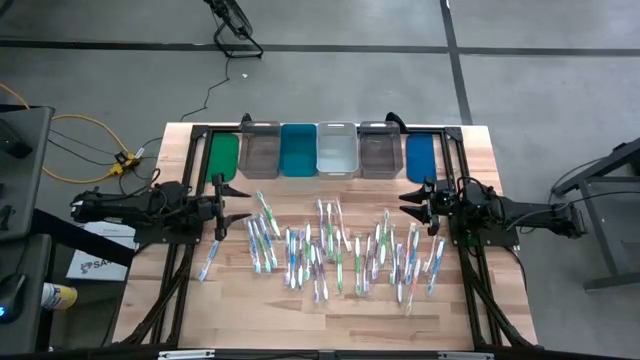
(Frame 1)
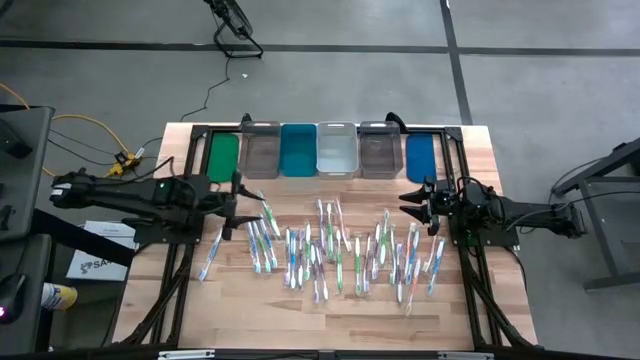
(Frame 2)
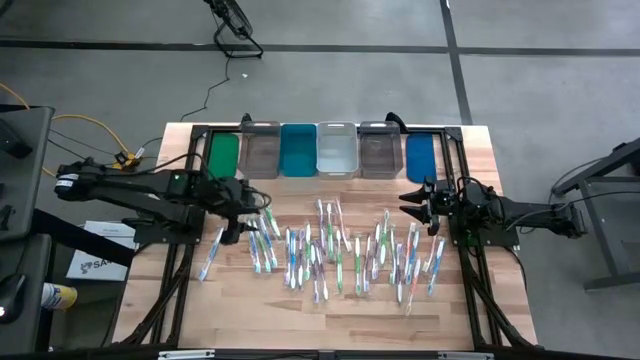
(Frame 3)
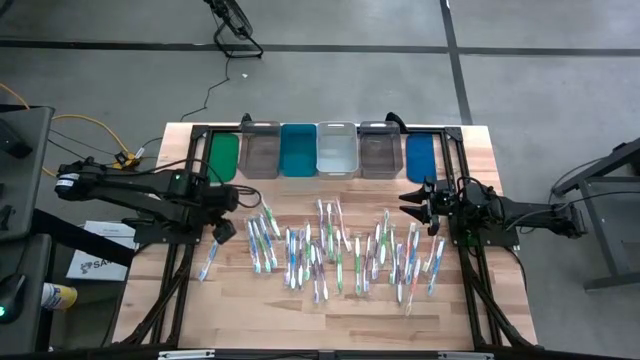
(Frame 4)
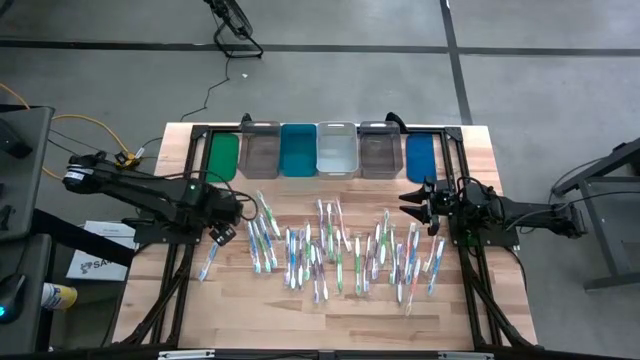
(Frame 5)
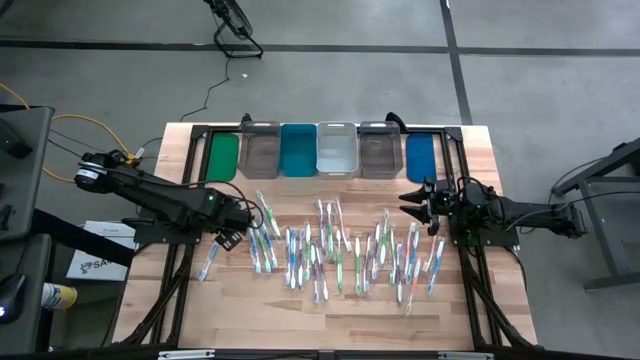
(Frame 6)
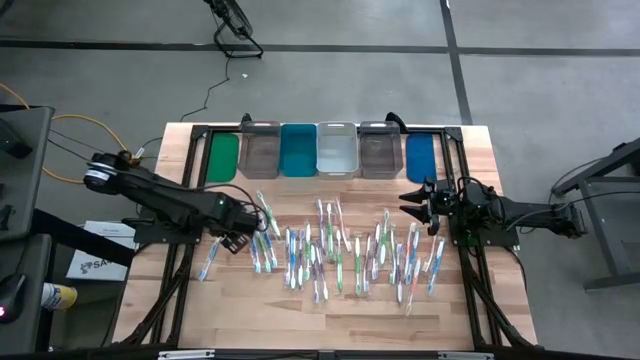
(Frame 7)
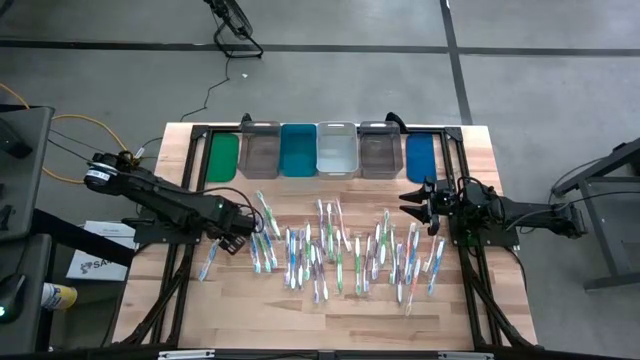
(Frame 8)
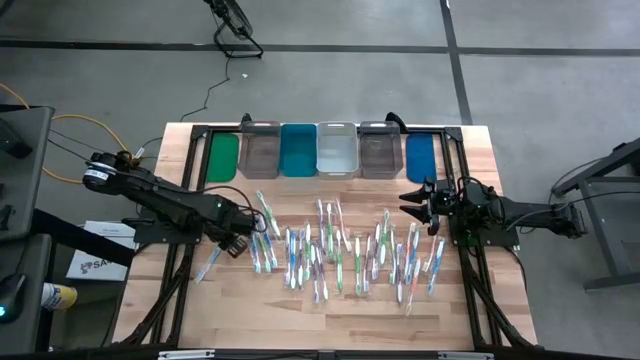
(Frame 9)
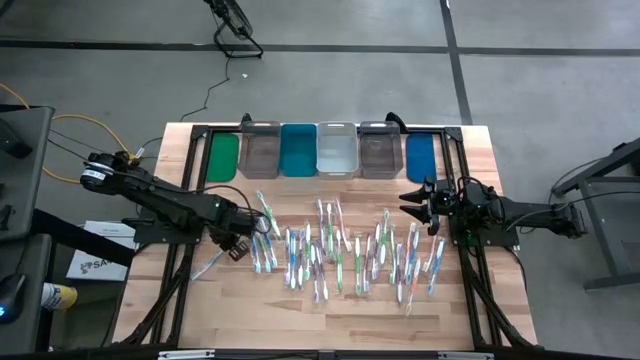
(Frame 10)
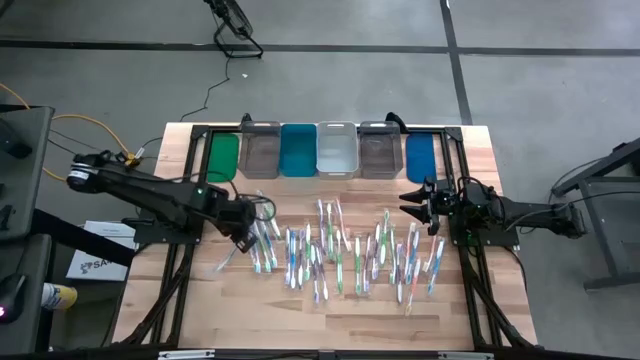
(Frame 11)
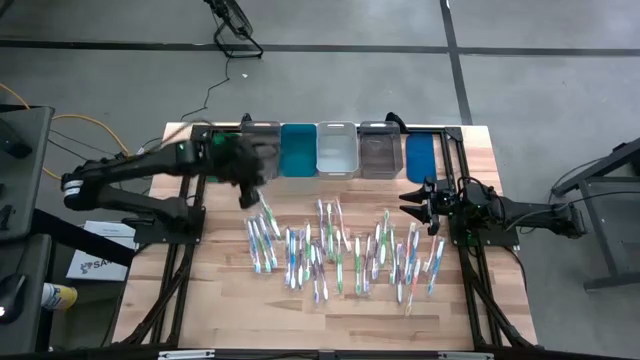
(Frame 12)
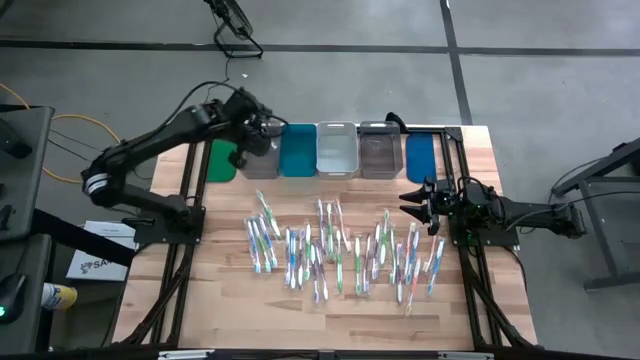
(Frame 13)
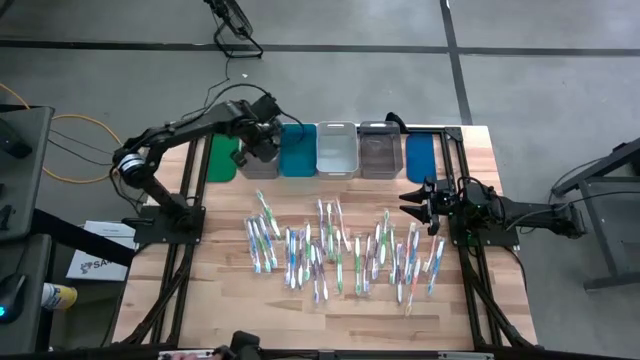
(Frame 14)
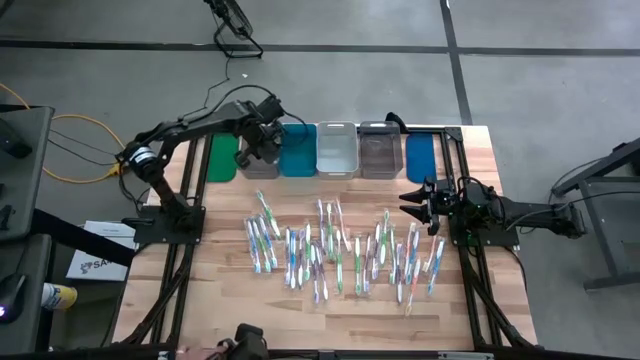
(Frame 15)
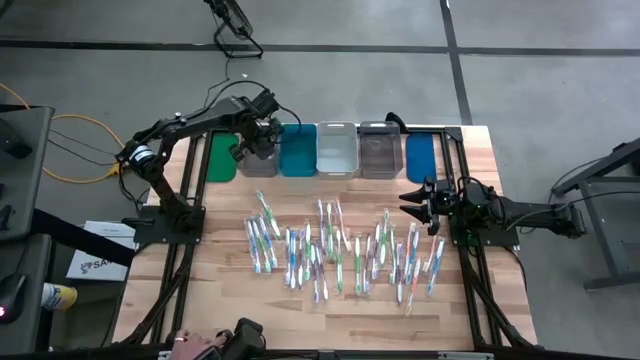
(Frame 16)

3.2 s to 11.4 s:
Task: Pick & Place Toothbrushes
Put the blue toothbrush into the left black bin

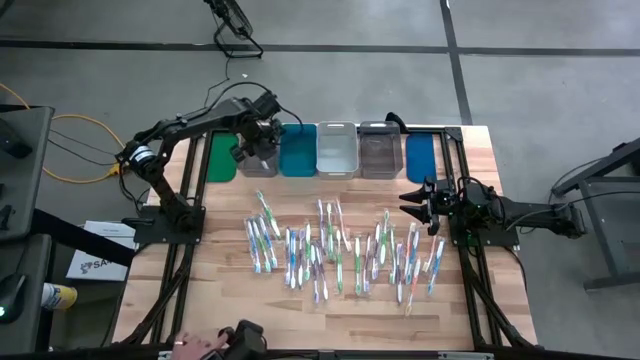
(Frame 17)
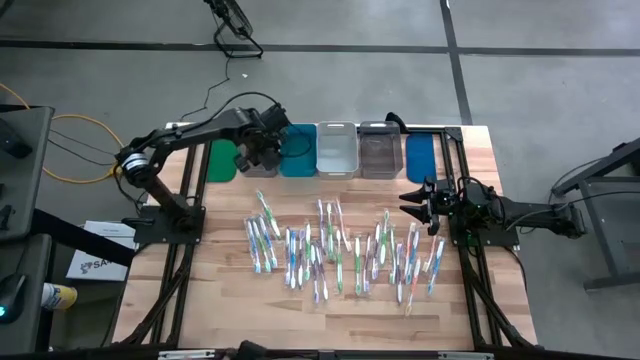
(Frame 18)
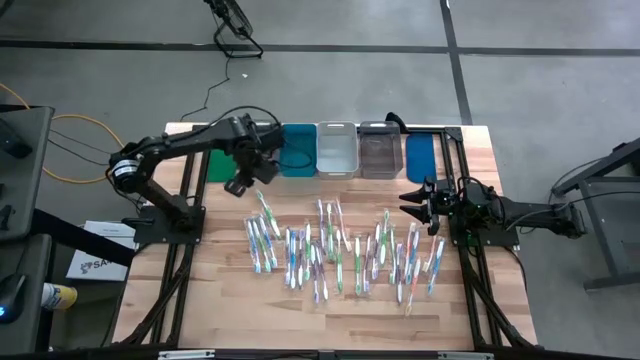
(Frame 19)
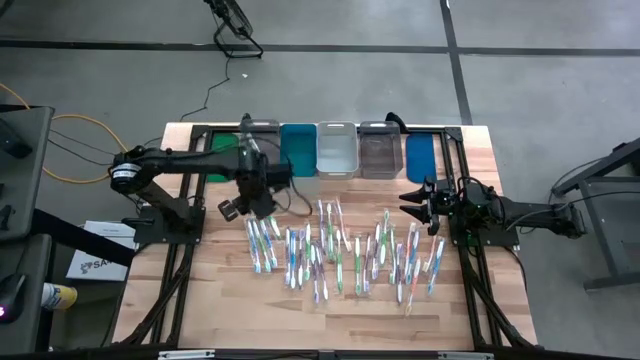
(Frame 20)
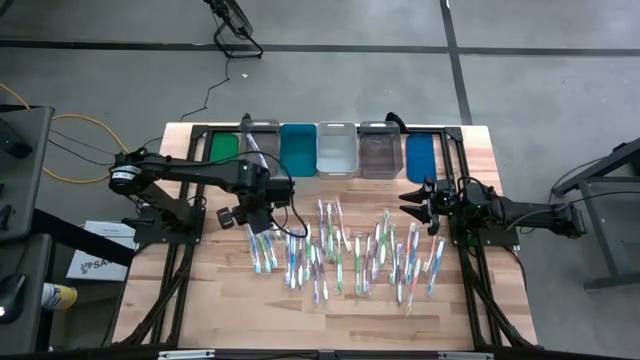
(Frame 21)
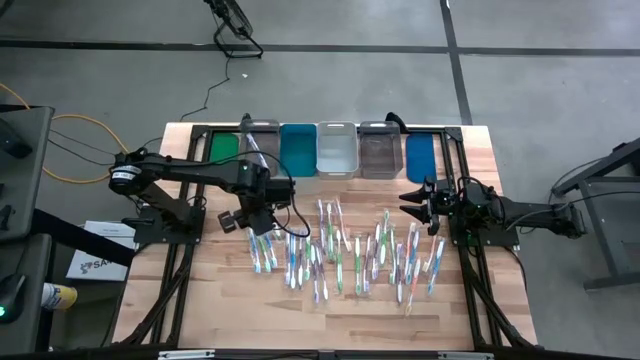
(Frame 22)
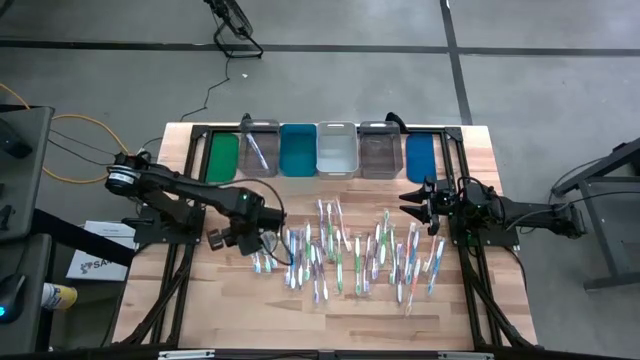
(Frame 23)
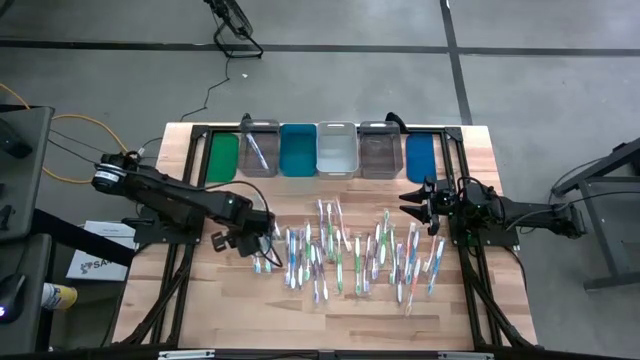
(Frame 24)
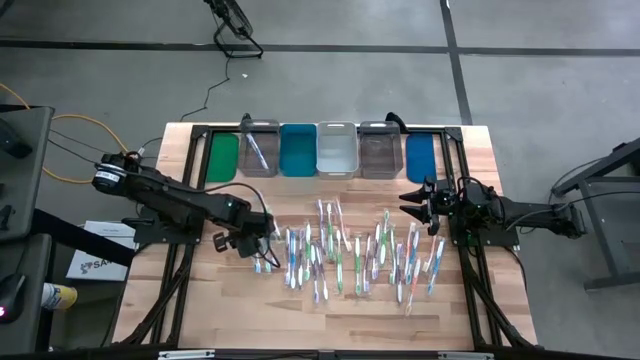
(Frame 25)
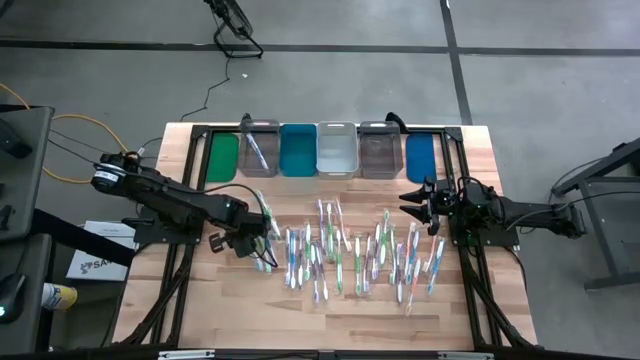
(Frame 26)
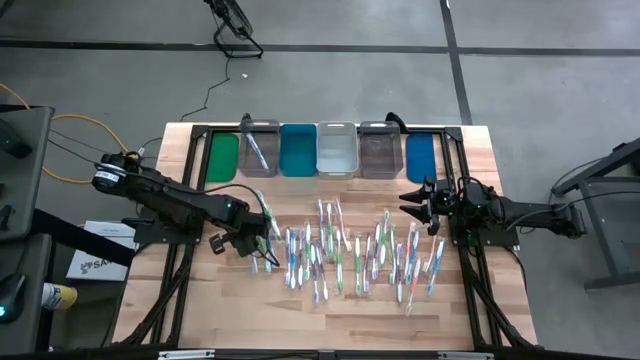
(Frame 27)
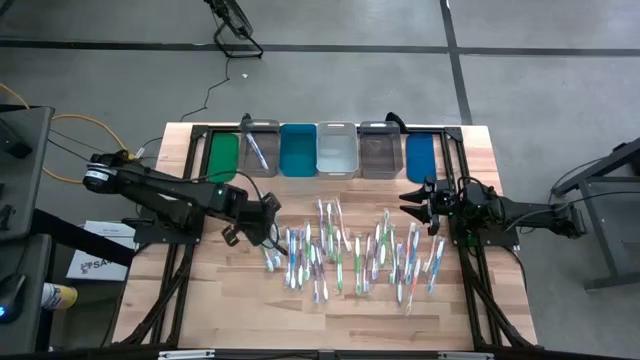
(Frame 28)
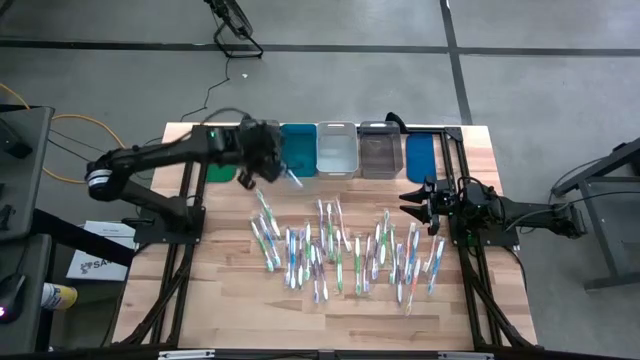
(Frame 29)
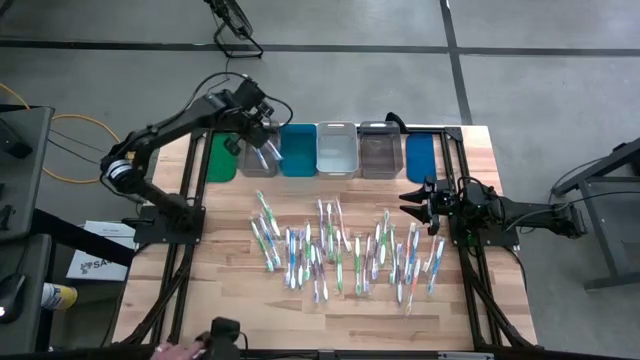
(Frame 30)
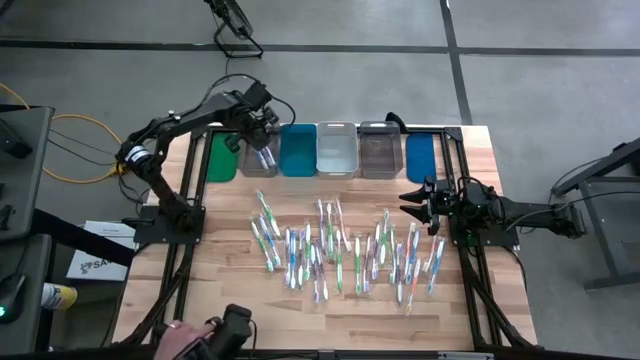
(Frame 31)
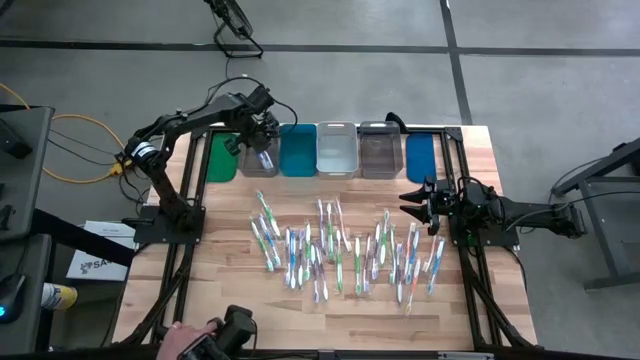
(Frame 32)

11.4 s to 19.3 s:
Put the blue toothbrush into the left black bin

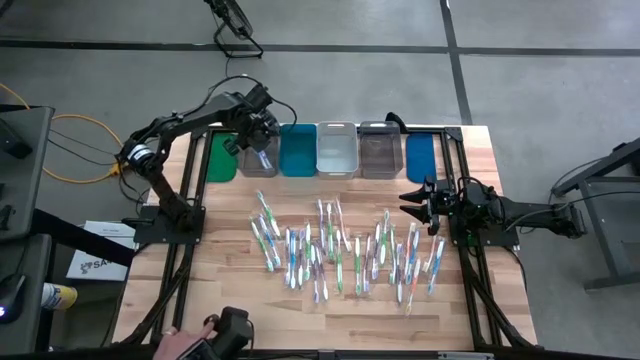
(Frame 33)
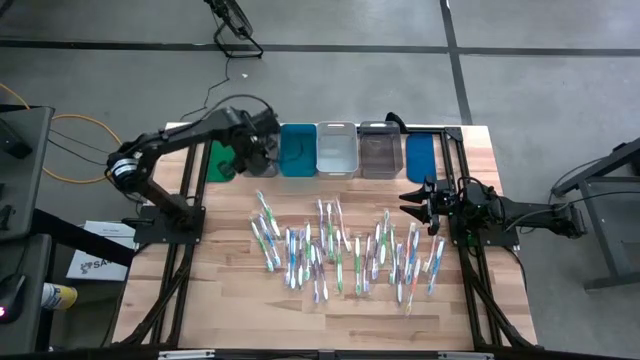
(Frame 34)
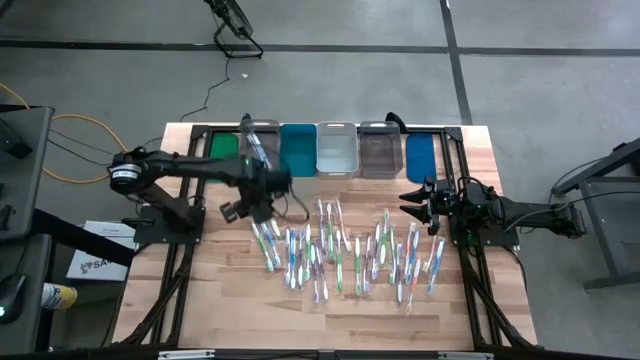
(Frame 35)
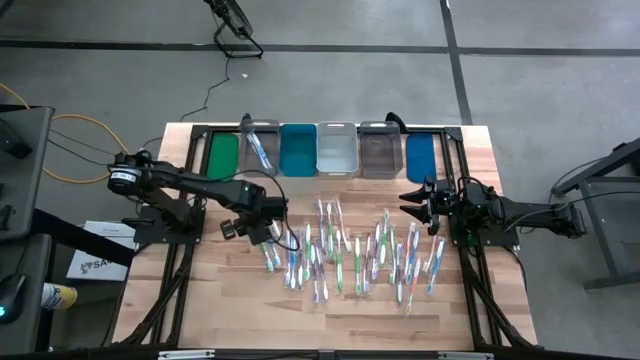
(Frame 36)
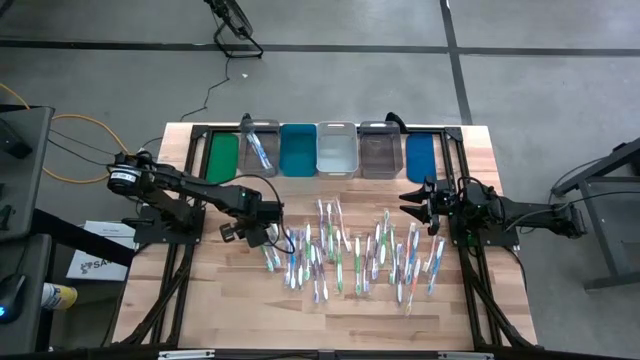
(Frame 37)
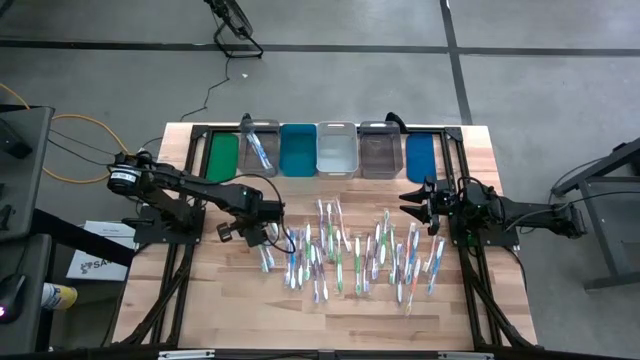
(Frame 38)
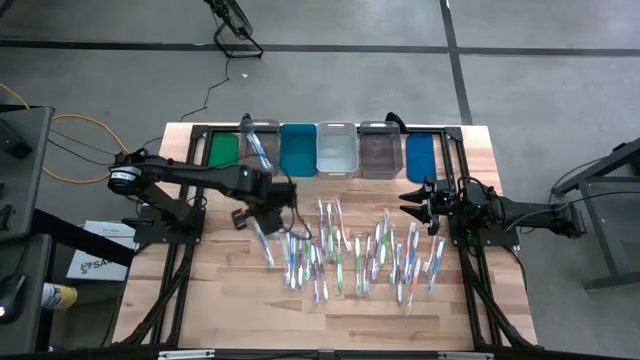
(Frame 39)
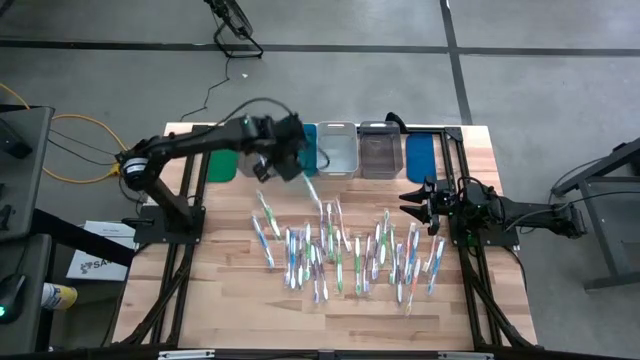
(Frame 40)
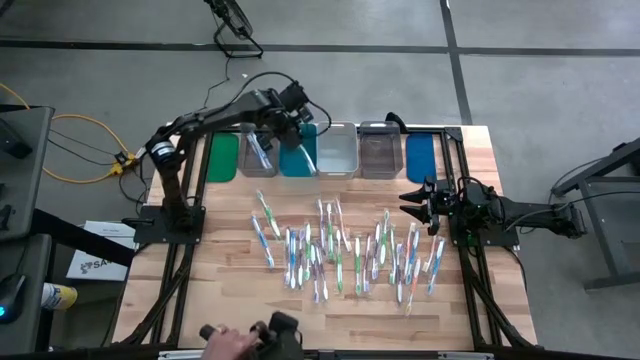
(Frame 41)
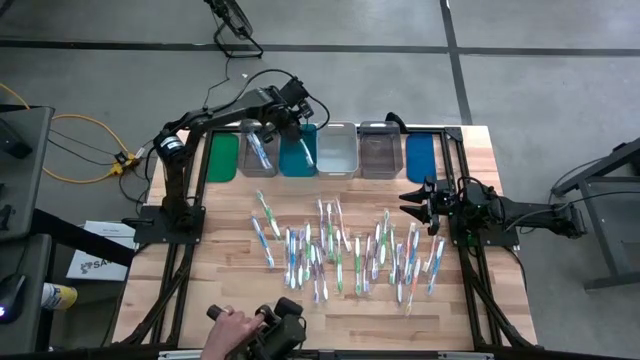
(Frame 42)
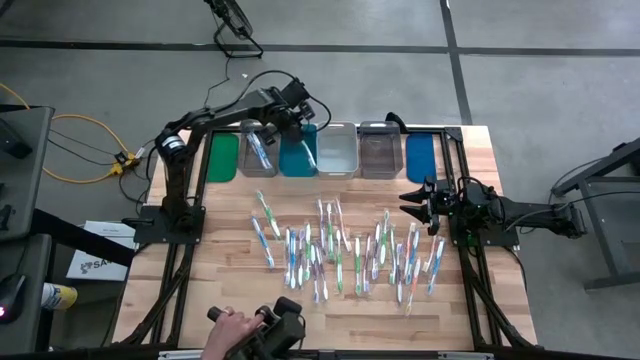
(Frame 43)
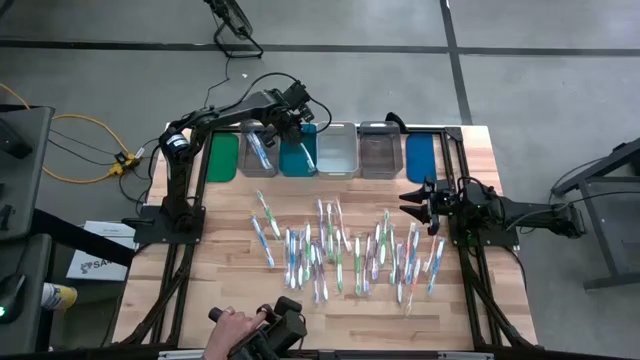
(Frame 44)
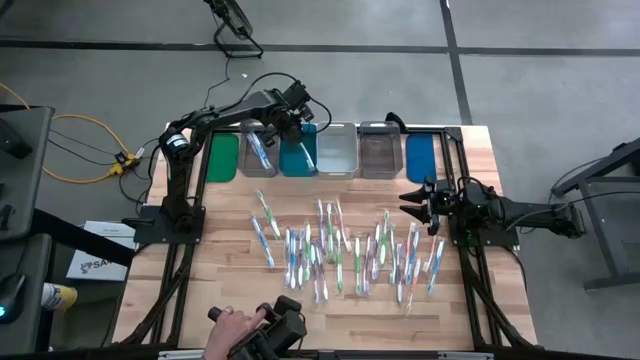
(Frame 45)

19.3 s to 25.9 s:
Put the green toothbrush into the blue bin
